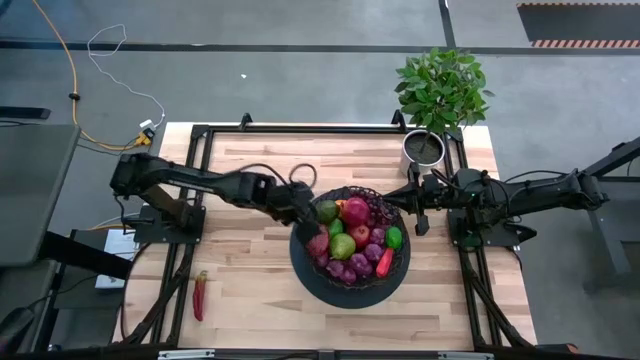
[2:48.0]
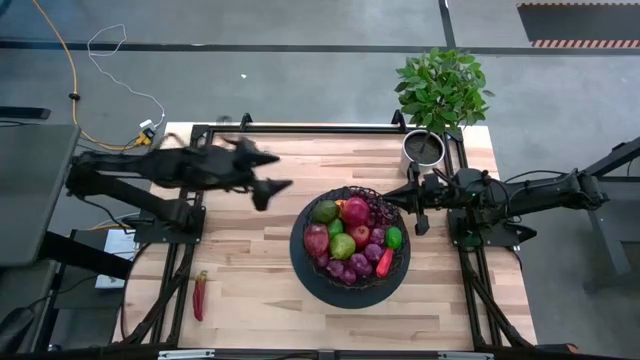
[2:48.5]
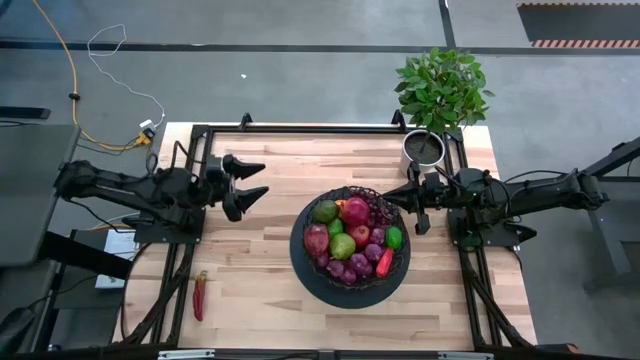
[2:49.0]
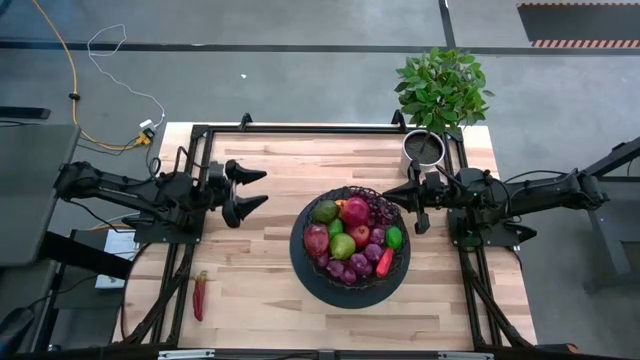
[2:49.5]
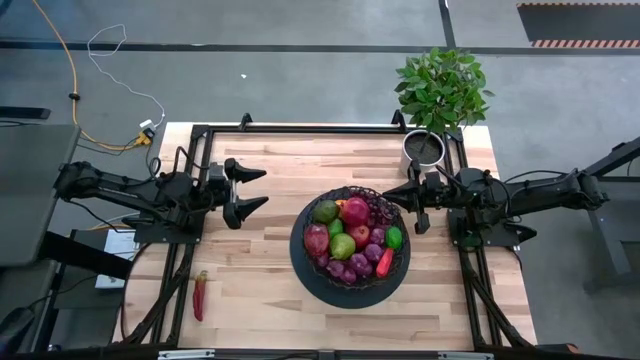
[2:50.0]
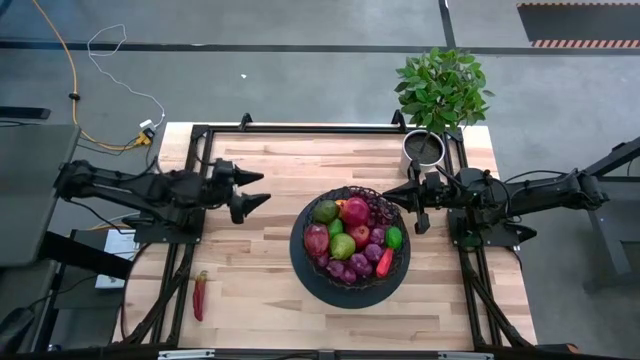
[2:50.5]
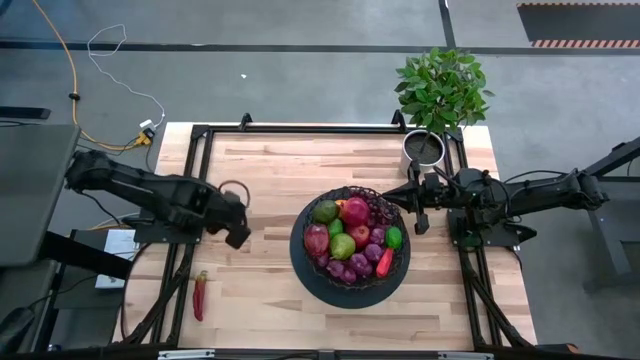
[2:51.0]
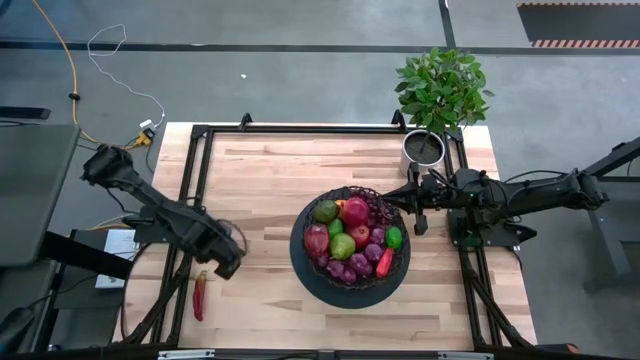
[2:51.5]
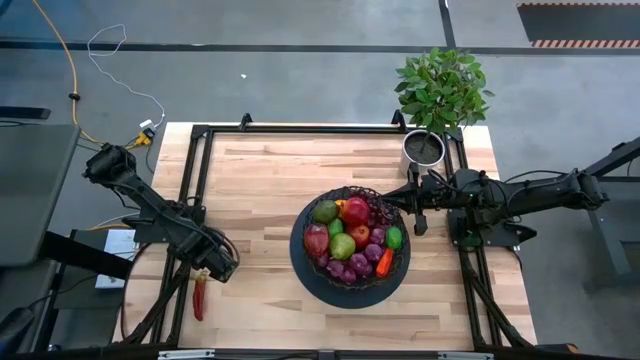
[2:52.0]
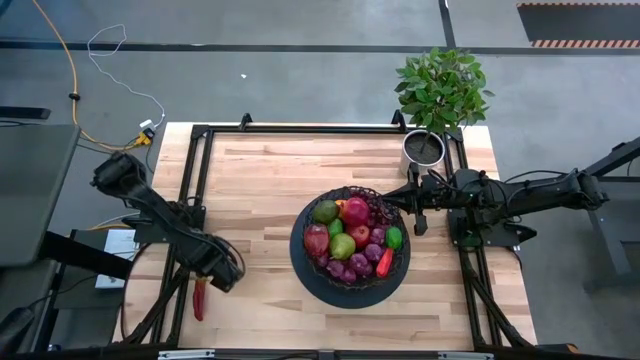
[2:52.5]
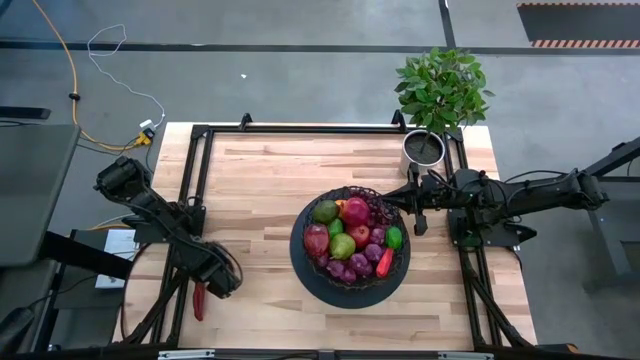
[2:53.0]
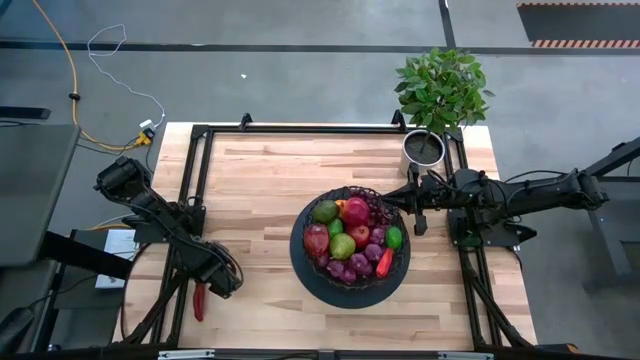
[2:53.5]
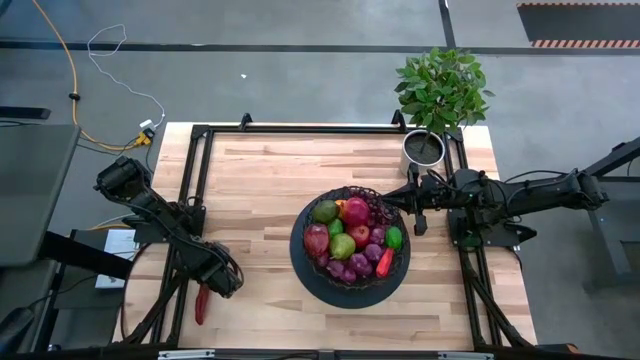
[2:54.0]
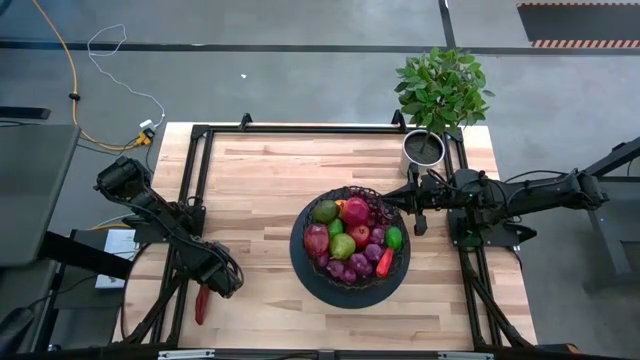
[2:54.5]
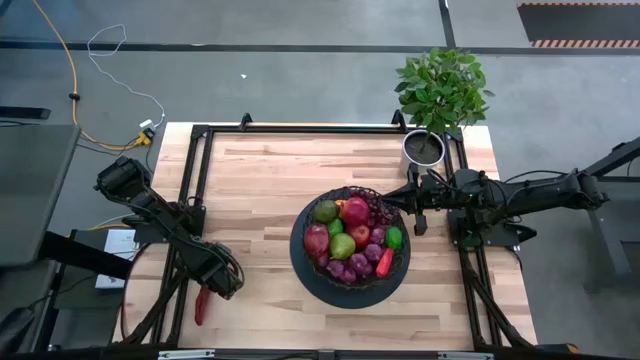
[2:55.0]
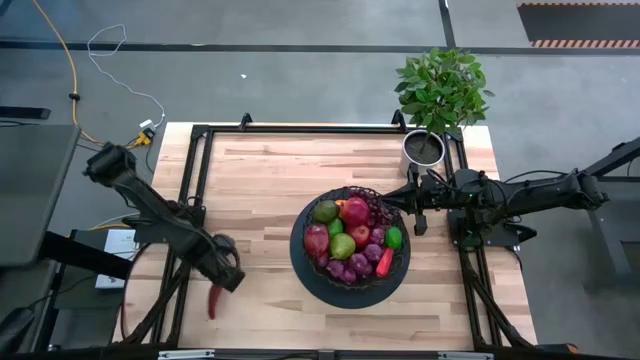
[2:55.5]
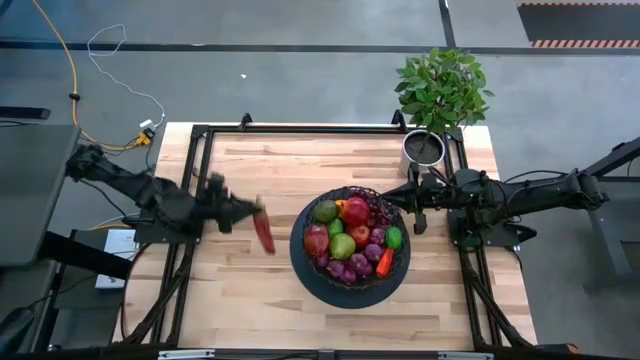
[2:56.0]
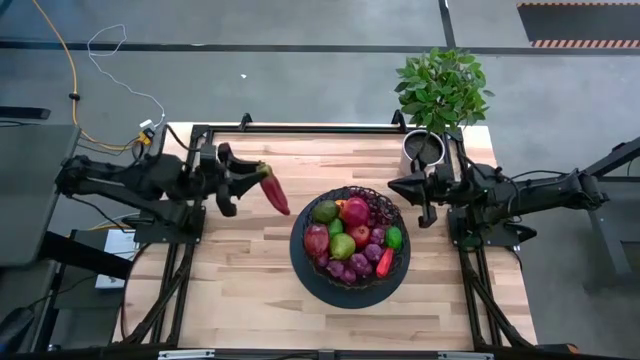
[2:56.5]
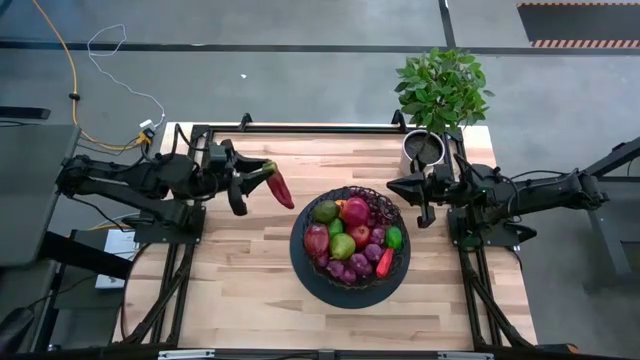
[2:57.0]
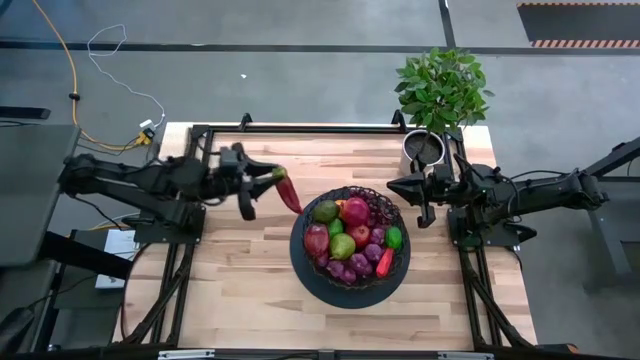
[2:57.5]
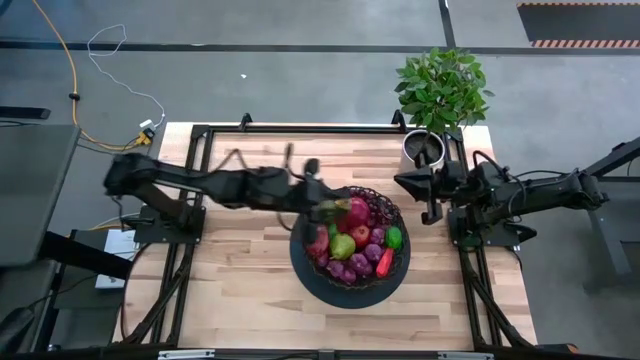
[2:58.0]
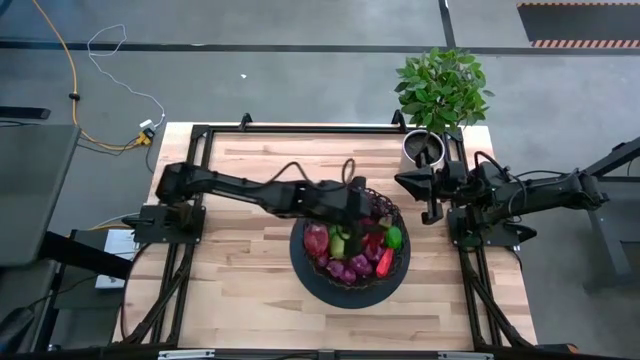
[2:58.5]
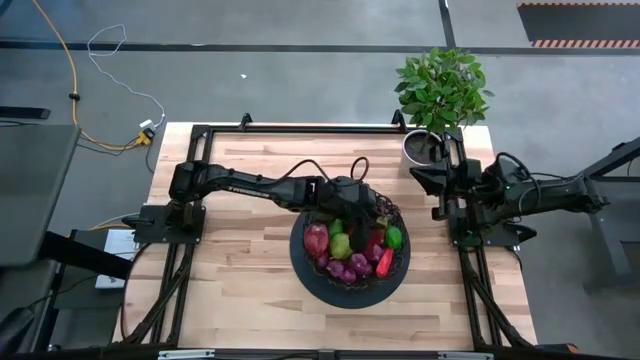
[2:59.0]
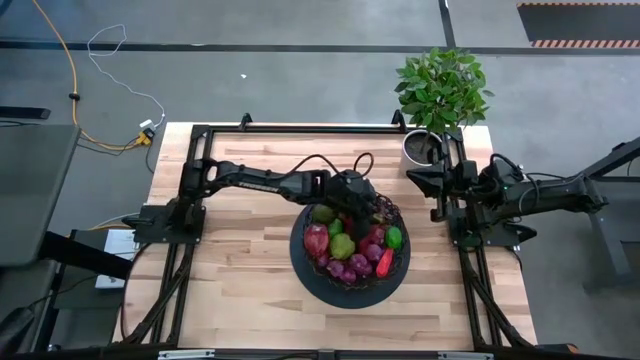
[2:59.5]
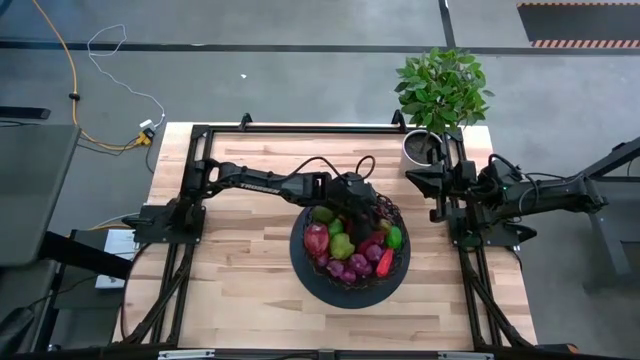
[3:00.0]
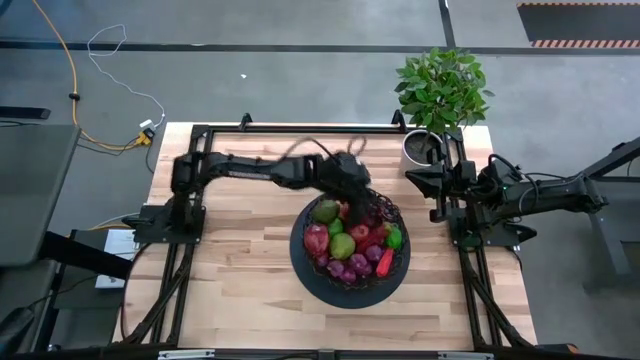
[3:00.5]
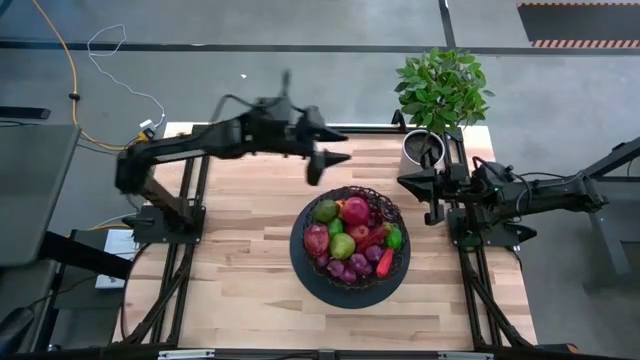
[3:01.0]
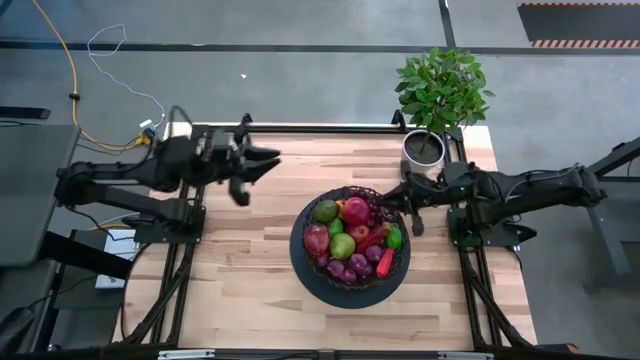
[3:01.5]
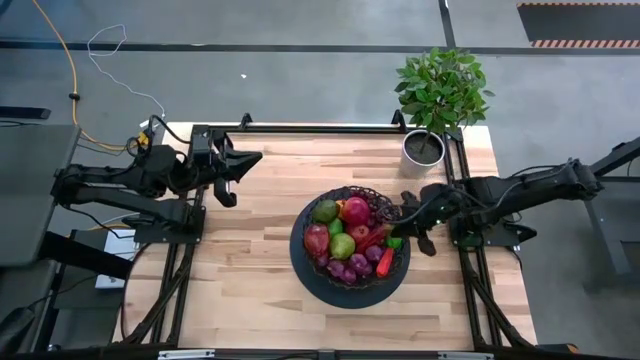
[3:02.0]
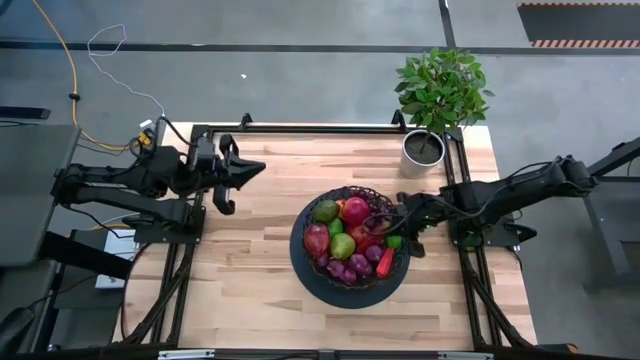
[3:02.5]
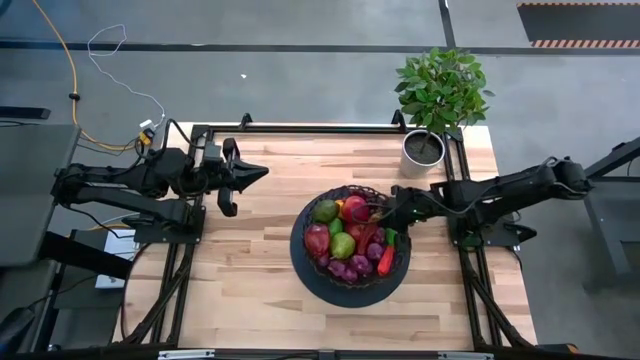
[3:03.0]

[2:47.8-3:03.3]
Task: Build produce basket
Put the red chili pepper into the basket

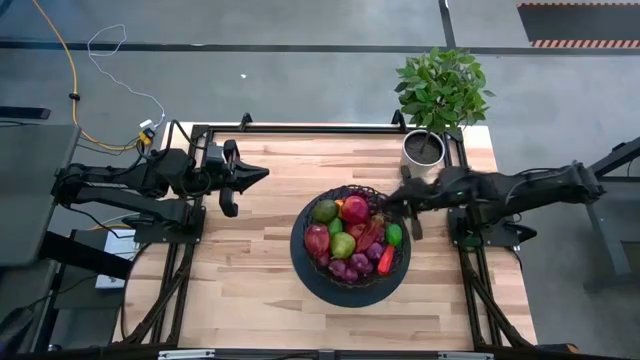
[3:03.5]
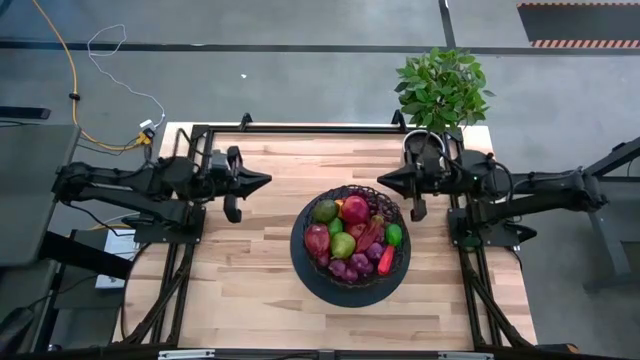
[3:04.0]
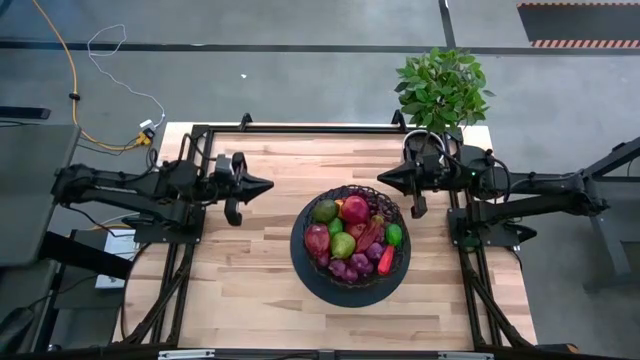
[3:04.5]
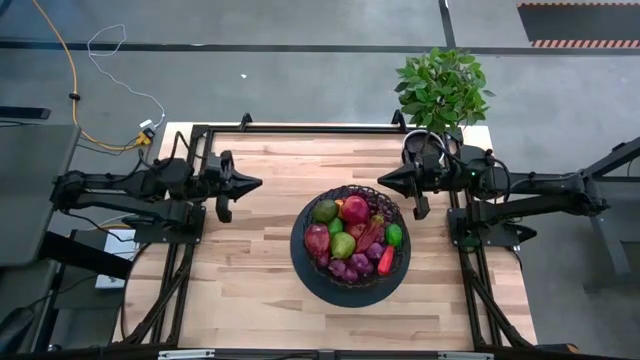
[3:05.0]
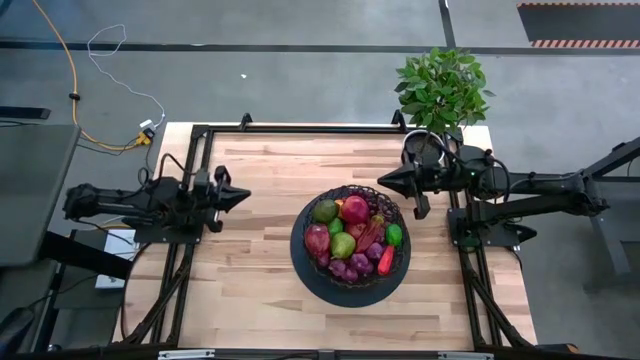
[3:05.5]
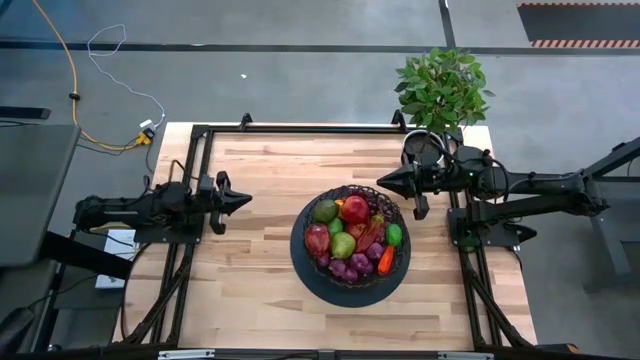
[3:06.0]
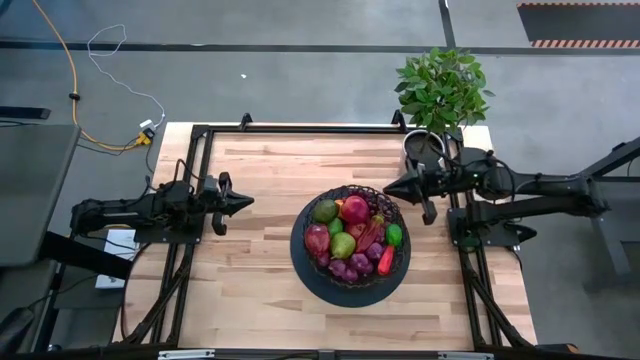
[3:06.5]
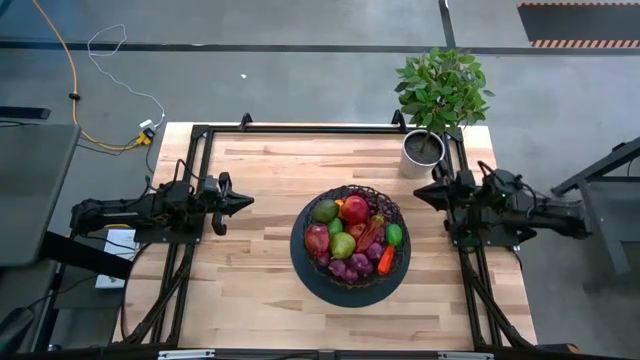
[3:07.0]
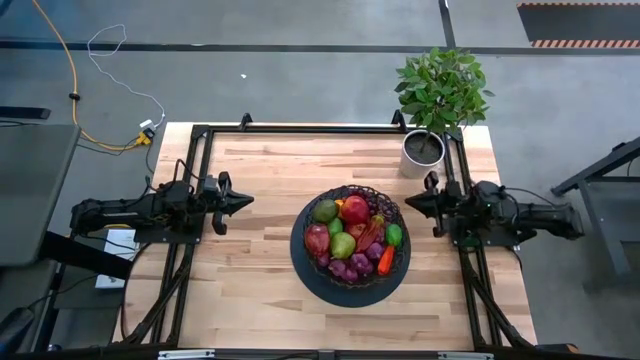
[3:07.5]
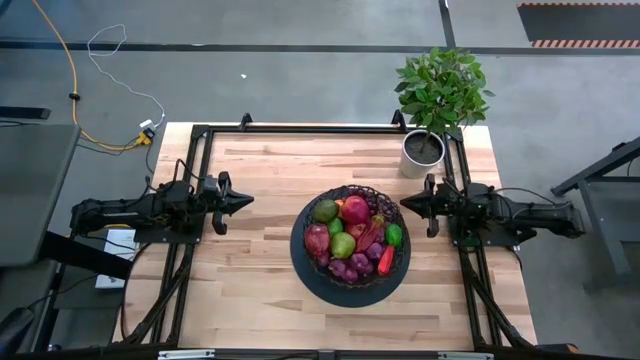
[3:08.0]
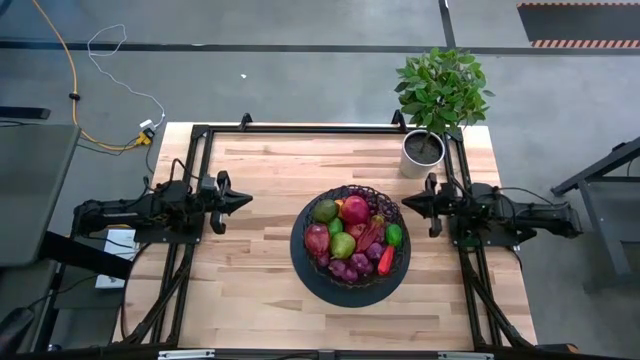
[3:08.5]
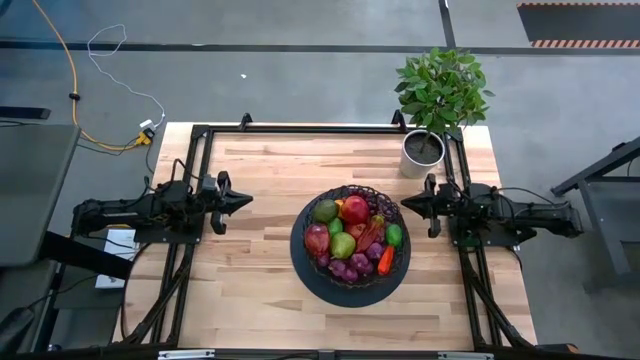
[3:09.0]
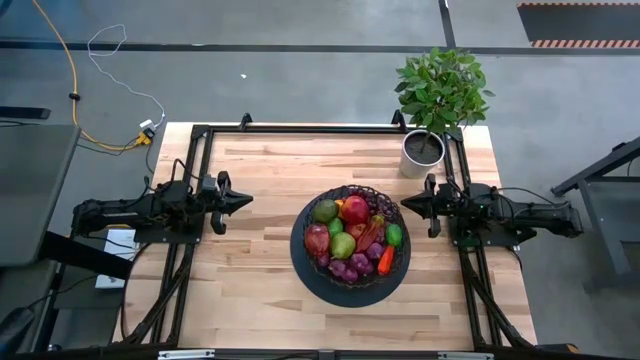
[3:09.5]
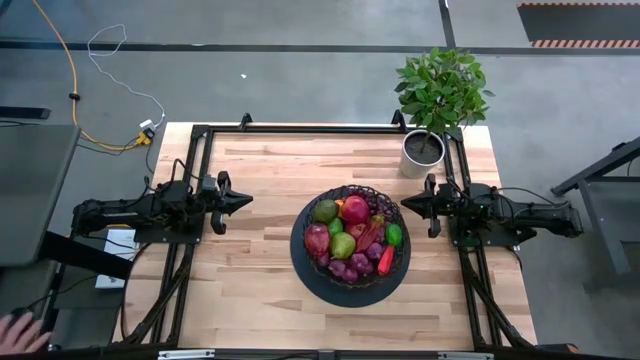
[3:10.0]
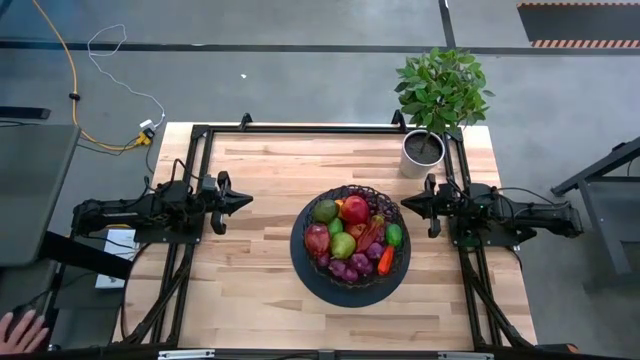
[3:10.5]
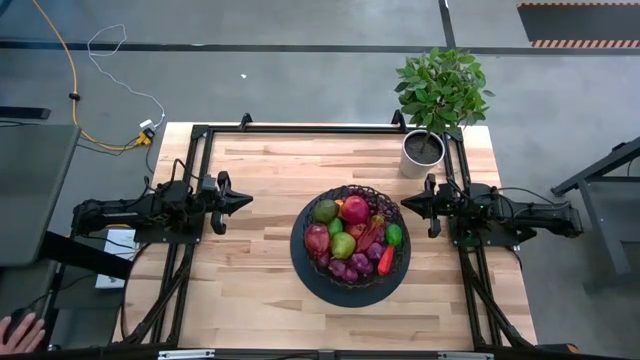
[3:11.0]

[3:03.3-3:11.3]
Return to Home Position
